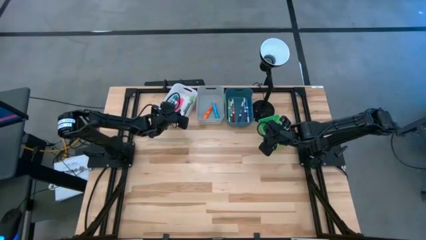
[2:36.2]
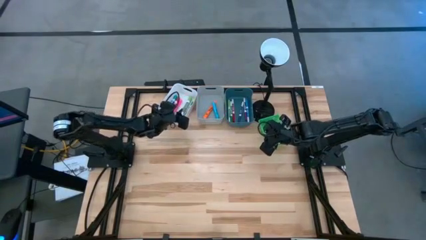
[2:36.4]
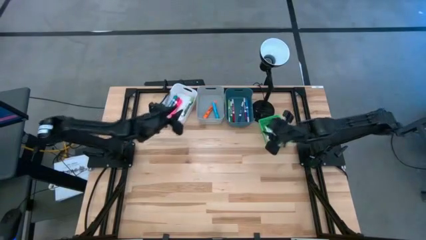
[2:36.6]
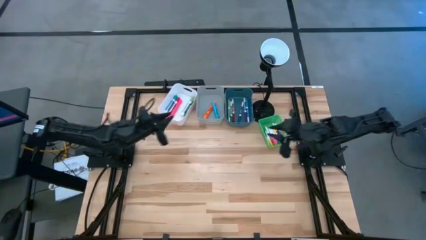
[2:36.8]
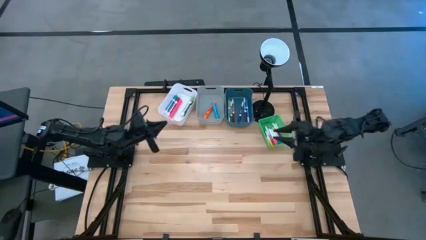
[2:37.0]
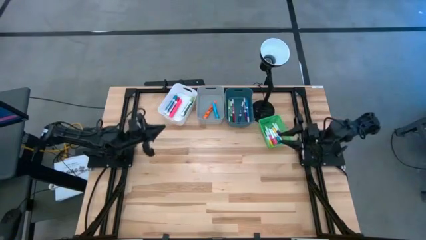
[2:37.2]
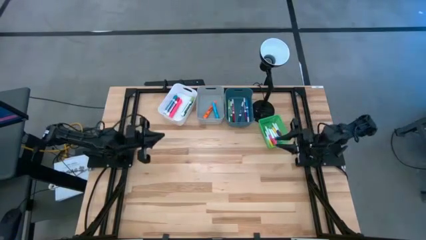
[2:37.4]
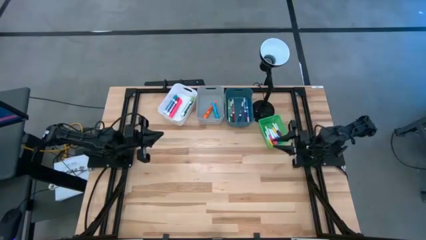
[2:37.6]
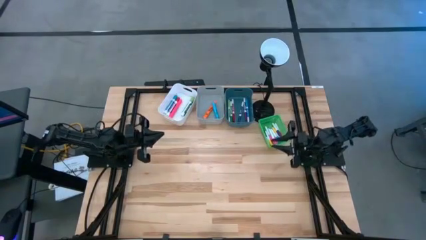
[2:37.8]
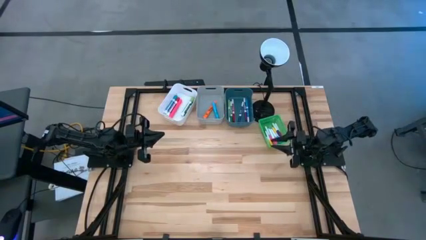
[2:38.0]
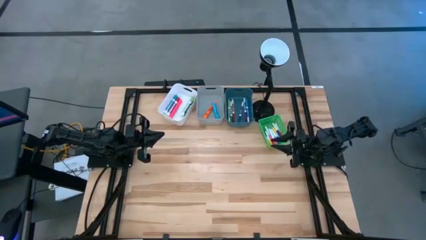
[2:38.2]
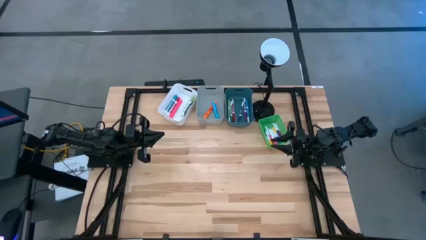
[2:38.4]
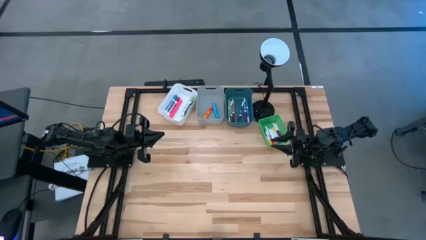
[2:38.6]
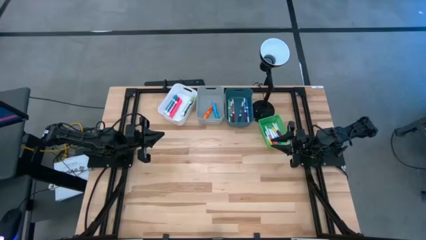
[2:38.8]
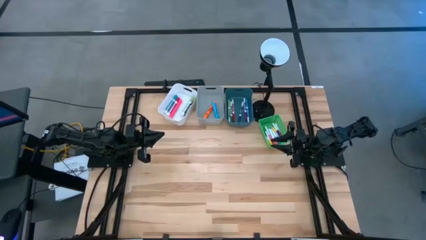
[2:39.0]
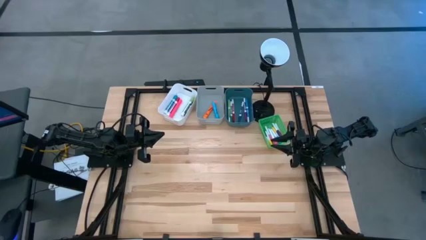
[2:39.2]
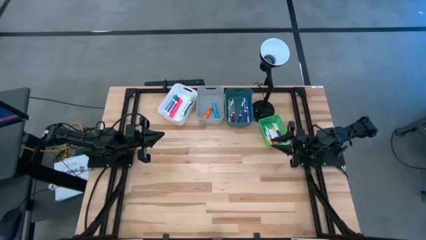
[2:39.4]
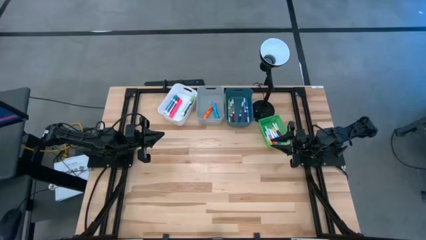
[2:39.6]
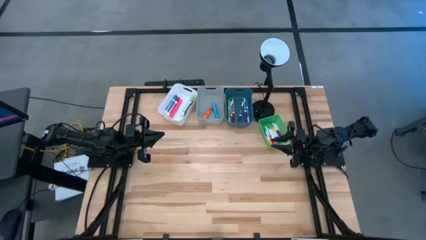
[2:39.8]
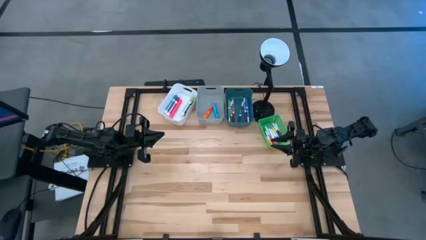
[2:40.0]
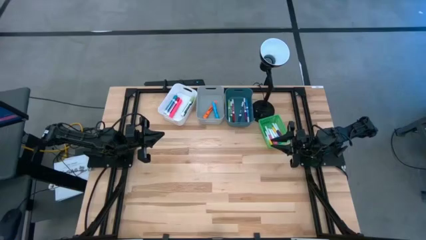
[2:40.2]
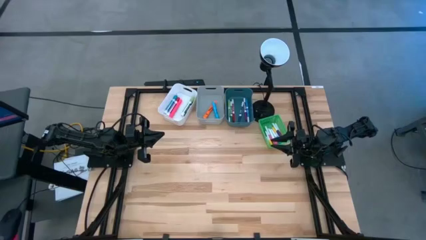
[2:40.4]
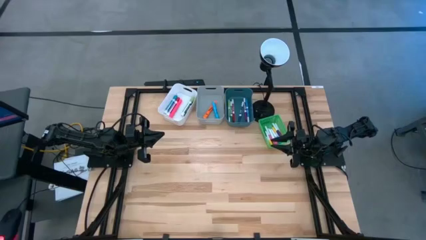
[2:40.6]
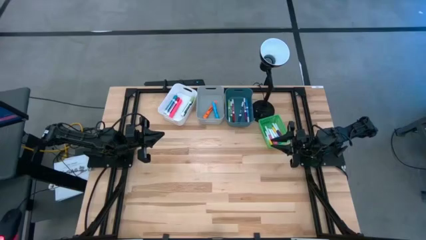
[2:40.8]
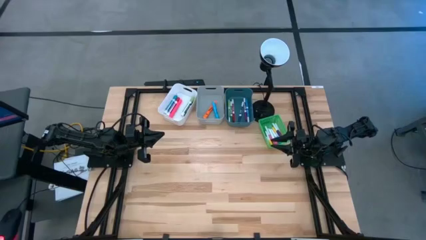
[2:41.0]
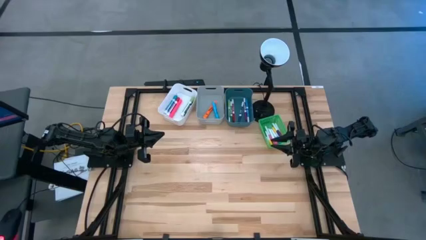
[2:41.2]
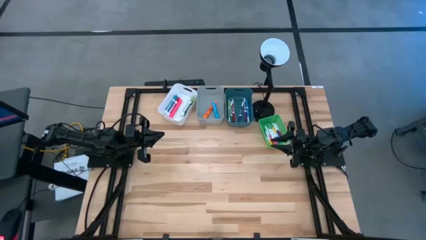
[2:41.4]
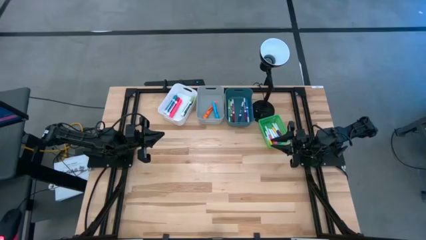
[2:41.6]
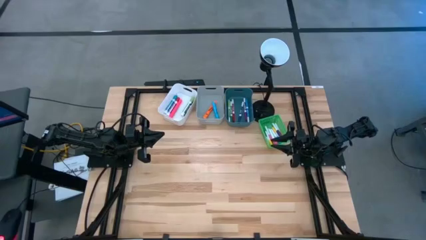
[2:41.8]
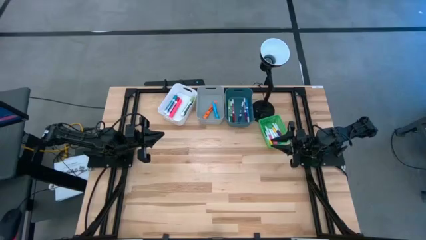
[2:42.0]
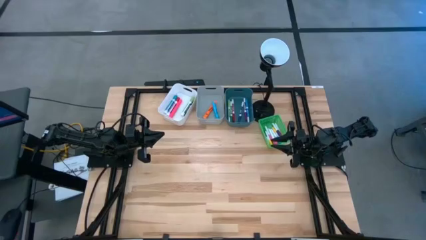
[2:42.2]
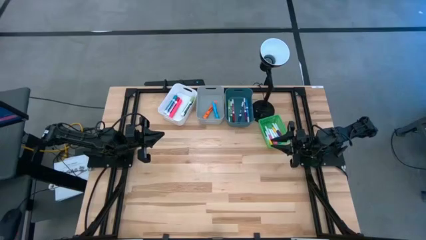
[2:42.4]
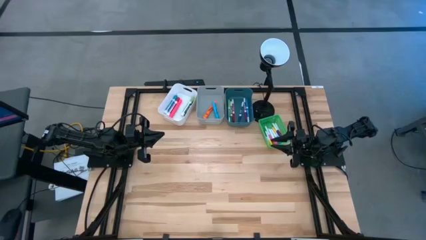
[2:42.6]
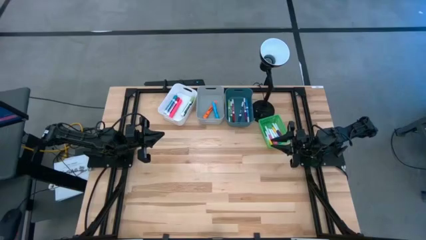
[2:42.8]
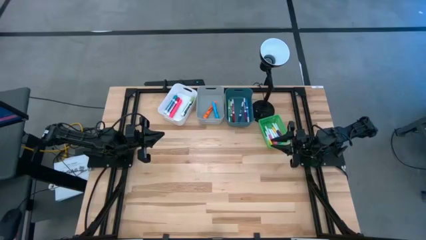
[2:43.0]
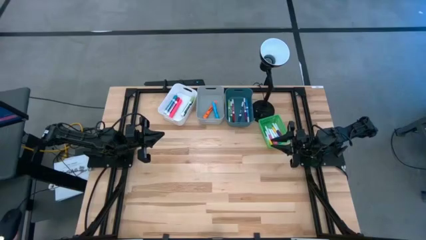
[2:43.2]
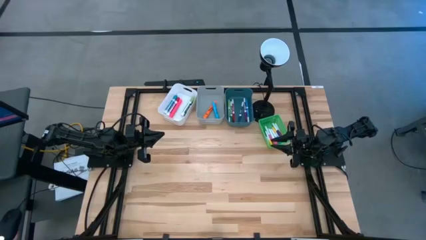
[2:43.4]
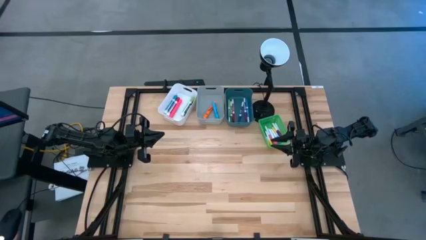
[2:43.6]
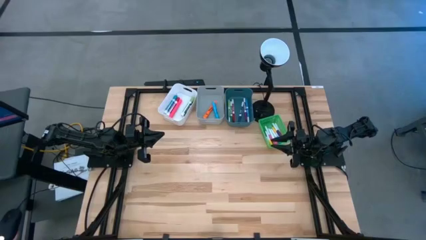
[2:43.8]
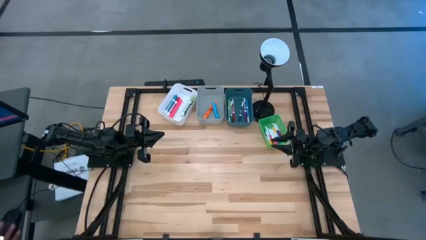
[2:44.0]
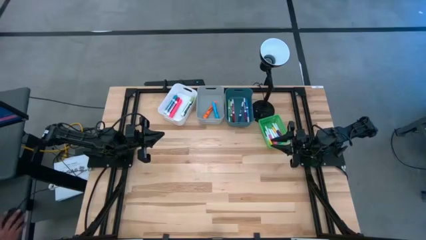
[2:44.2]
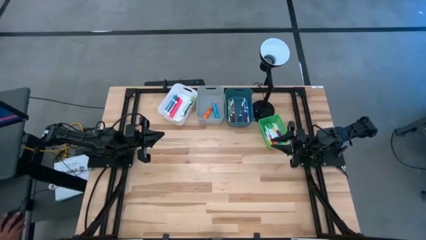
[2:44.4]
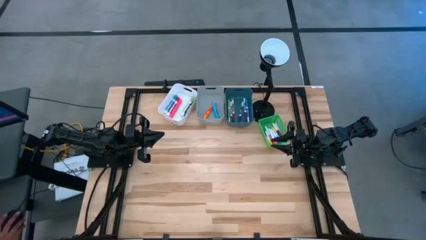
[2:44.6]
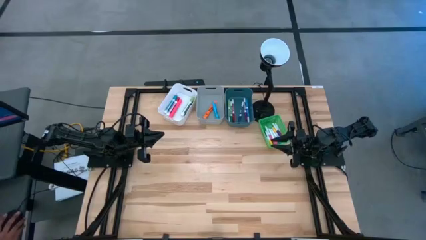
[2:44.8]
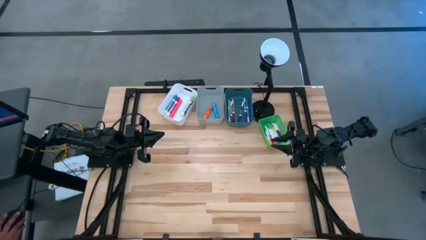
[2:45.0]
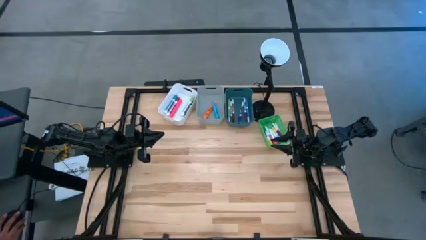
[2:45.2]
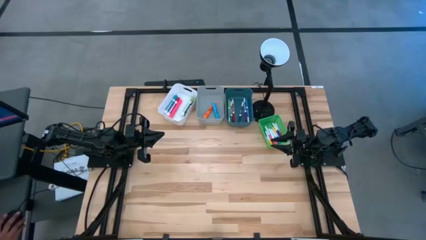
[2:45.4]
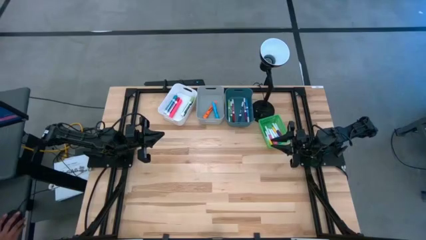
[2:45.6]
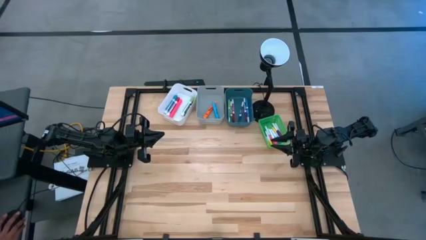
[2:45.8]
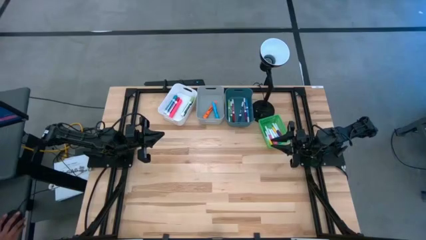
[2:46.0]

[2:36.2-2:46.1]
Task: Pick & Place Markers
Return to Home Position

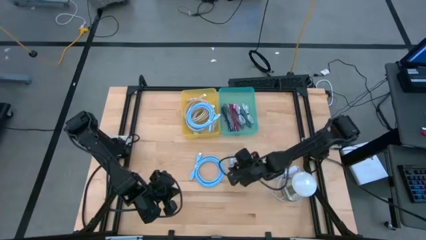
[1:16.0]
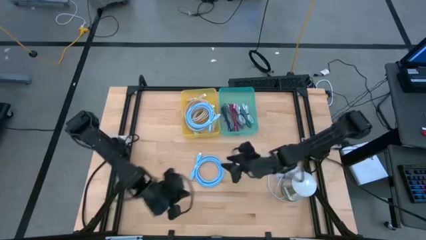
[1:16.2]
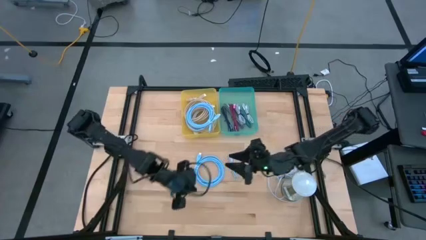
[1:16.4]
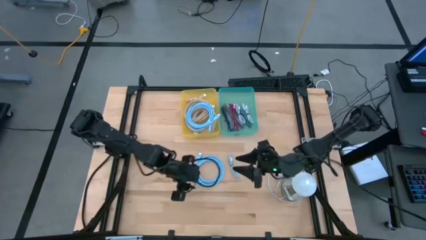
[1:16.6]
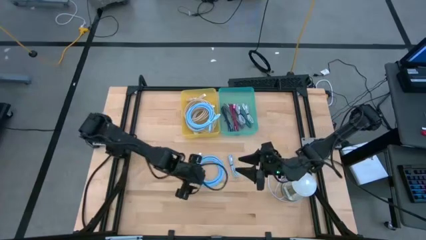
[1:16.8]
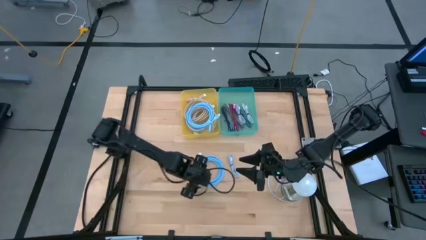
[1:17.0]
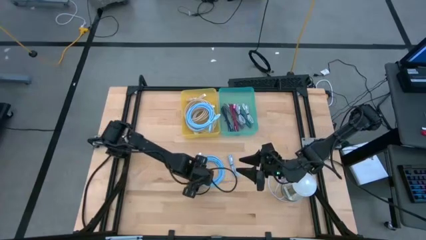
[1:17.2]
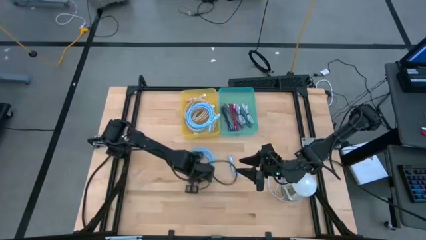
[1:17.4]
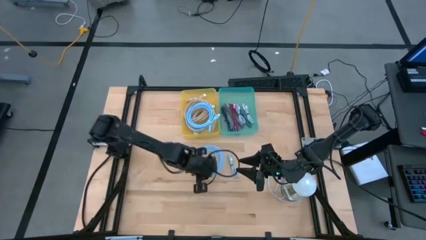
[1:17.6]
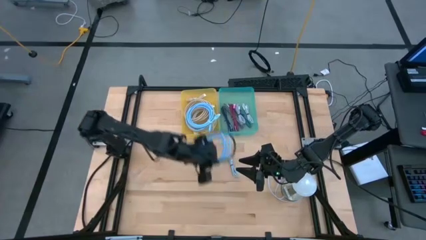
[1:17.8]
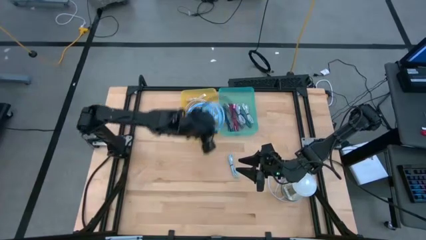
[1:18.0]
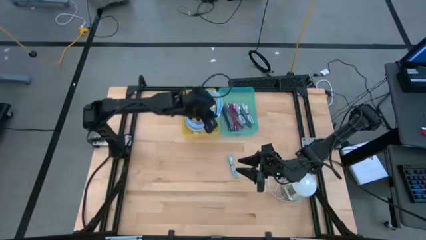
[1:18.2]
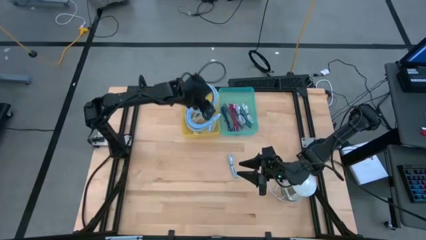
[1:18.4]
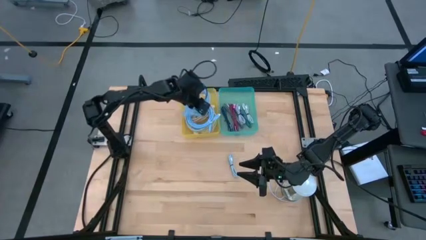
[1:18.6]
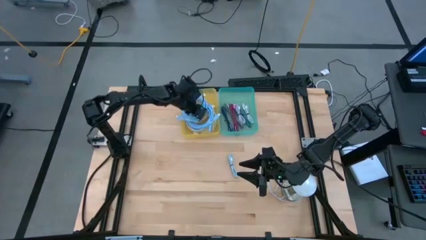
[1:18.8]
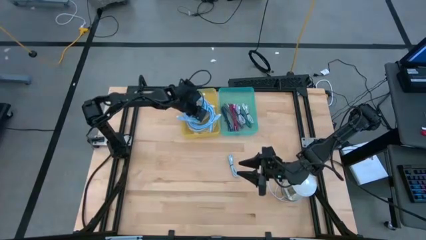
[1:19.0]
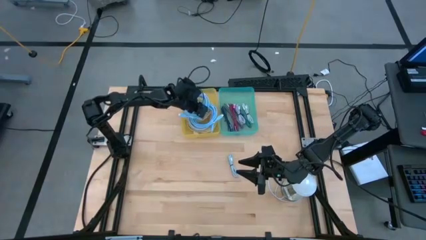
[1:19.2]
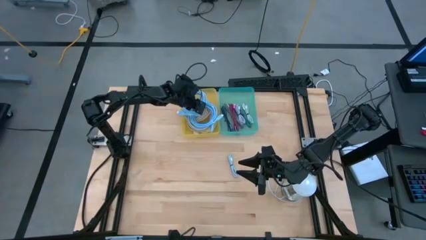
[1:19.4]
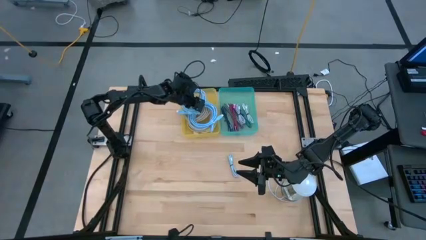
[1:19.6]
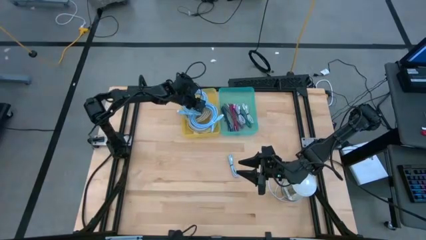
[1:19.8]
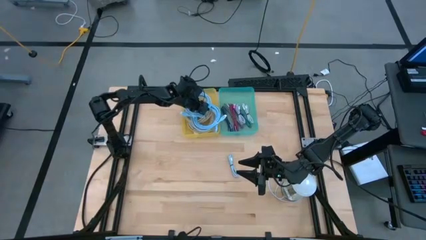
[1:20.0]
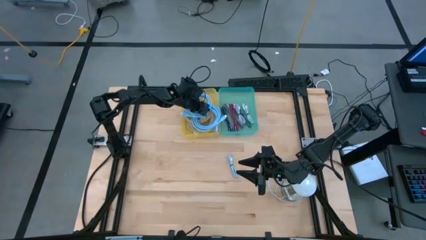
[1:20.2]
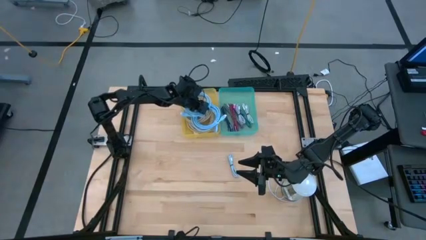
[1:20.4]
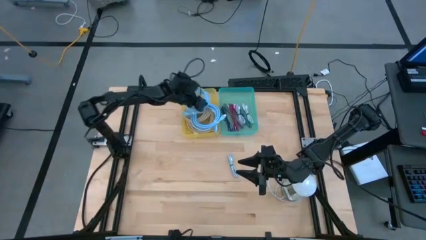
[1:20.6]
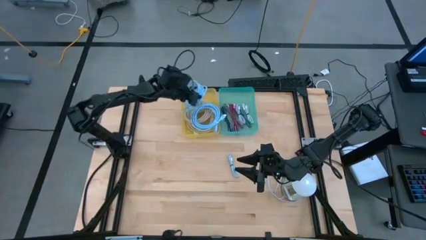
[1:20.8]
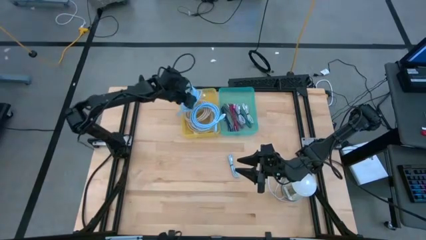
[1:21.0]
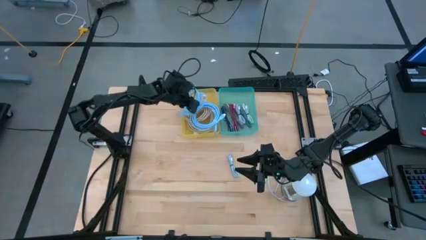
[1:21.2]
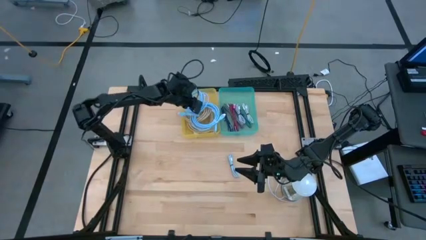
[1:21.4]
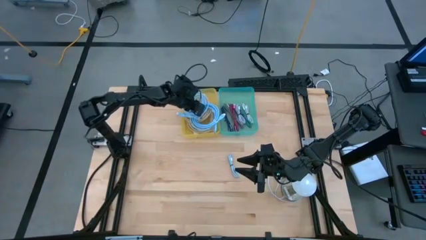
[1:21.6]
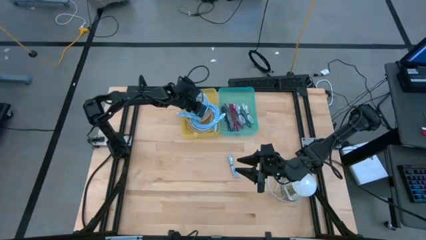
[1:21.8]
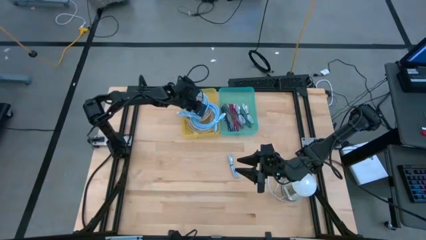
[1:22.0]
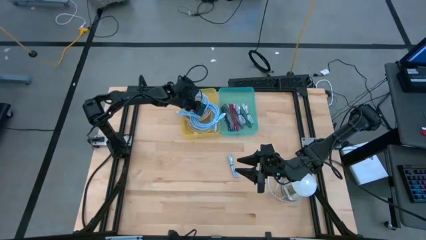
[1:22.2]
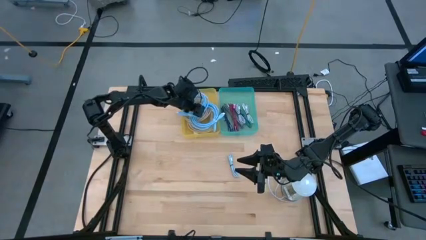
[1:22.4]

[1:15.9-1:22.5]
Task: Pick and place USB-C Cables
Put the large blue charger cable into the yellow bin

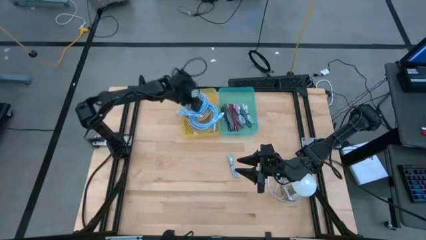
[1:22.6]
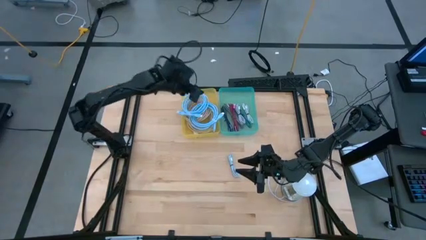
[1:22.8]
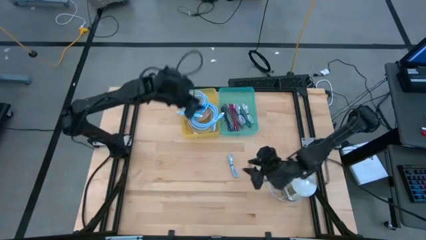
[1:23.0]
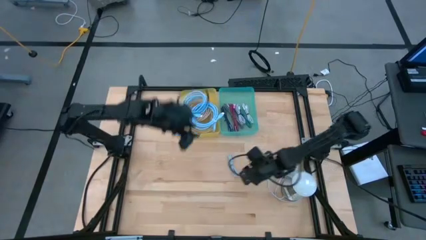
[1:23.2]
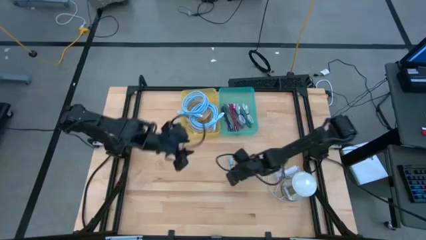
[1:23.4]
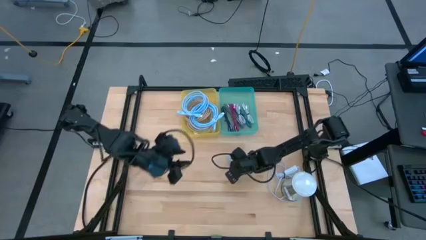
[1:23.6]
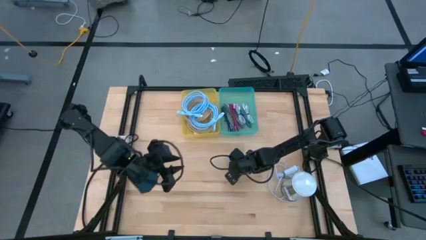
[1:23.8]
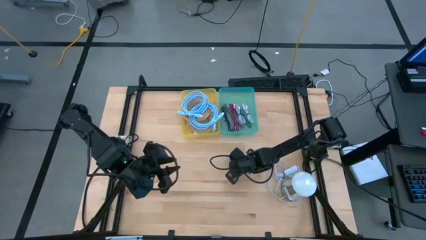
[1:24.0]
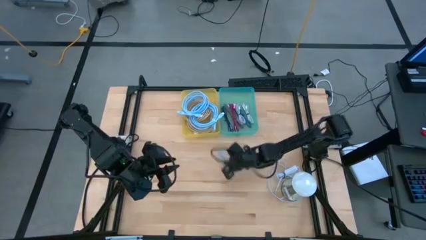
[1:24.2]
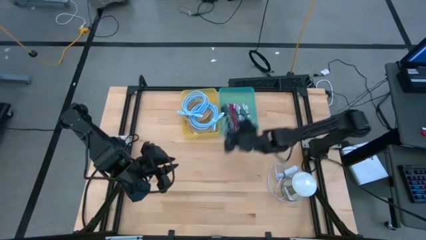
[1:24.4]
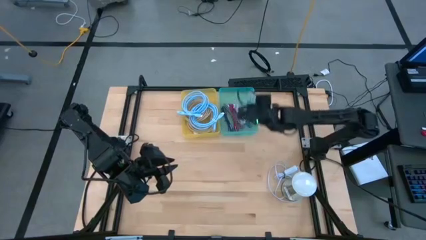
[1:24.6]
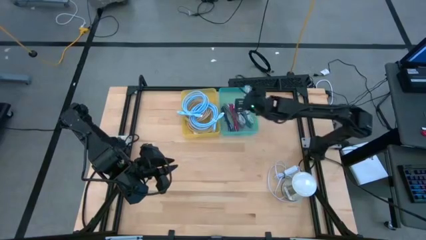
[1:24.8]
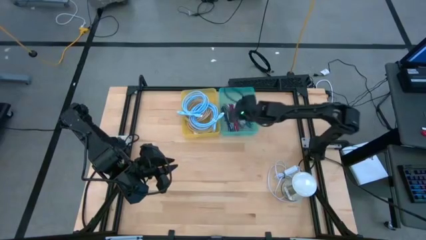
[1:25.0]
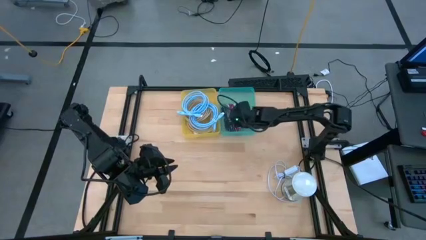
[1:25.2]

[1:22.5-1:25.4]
Put the small light blue charger cable into the green bin
